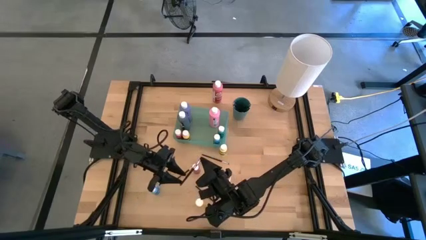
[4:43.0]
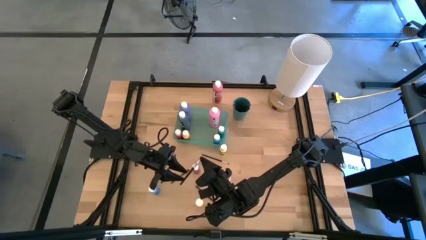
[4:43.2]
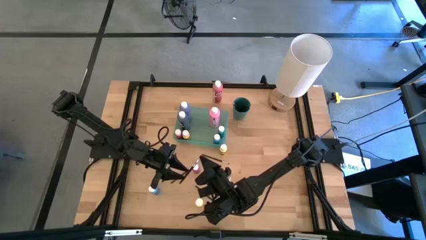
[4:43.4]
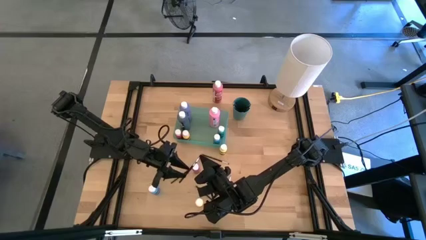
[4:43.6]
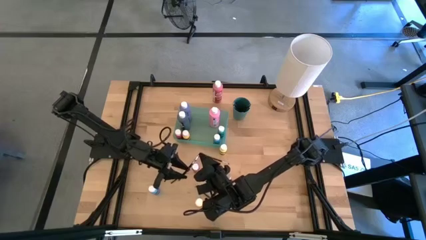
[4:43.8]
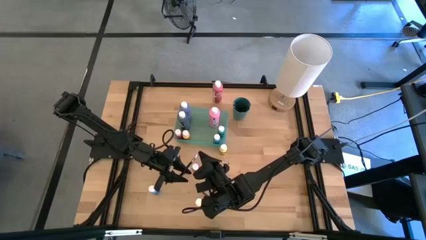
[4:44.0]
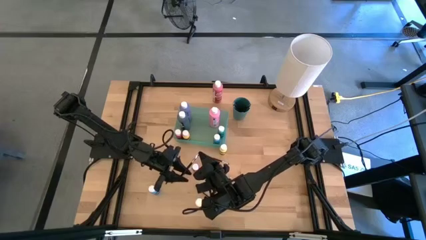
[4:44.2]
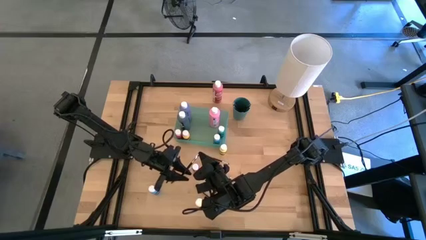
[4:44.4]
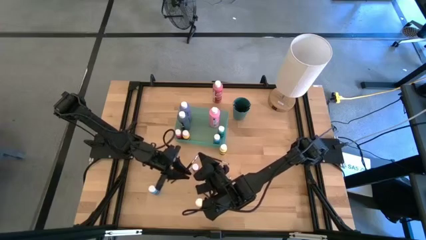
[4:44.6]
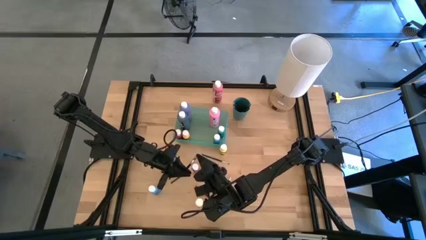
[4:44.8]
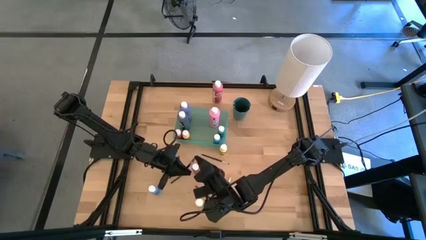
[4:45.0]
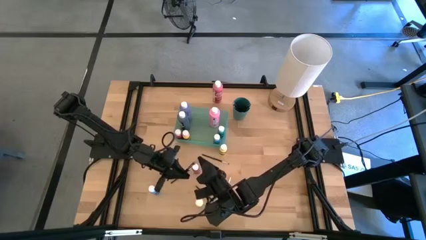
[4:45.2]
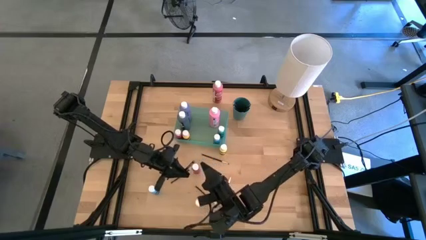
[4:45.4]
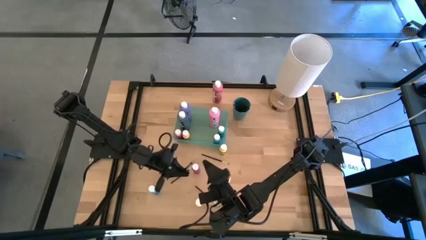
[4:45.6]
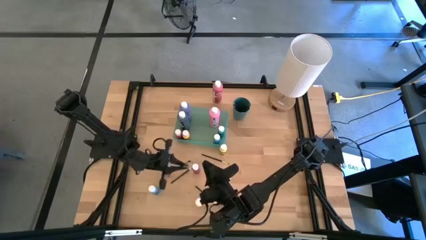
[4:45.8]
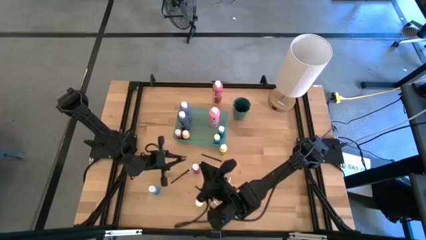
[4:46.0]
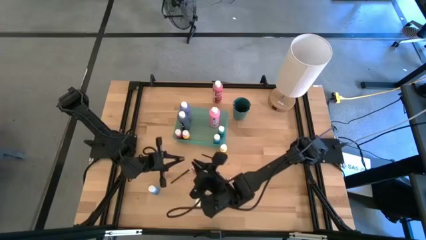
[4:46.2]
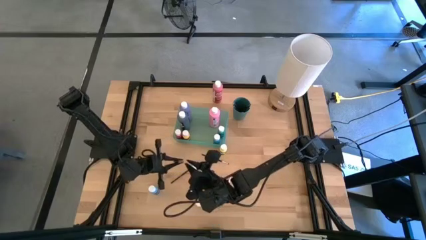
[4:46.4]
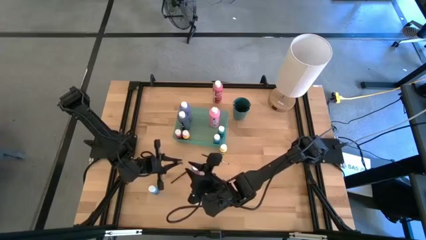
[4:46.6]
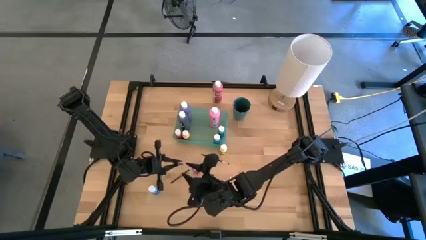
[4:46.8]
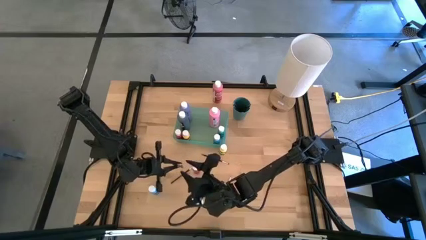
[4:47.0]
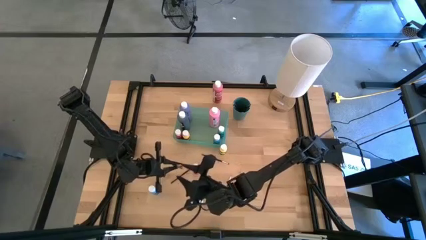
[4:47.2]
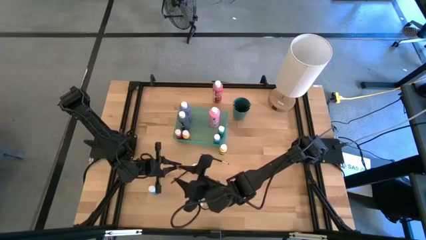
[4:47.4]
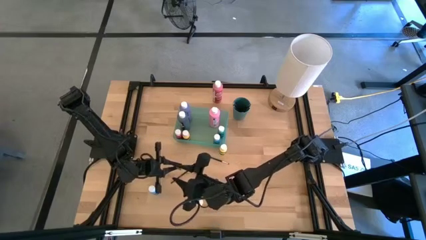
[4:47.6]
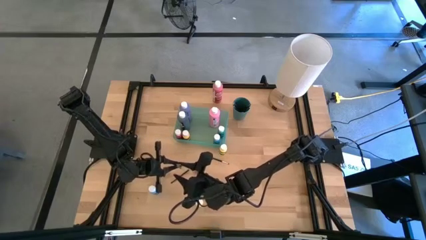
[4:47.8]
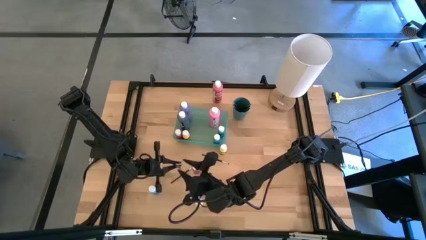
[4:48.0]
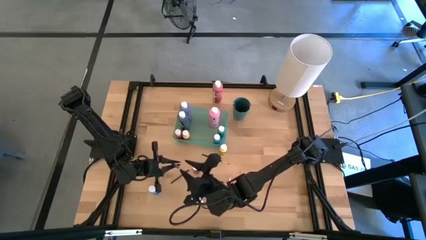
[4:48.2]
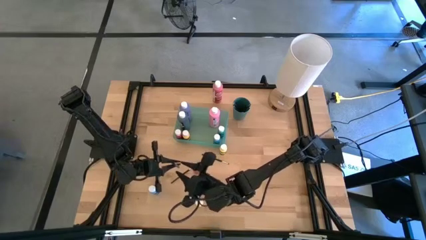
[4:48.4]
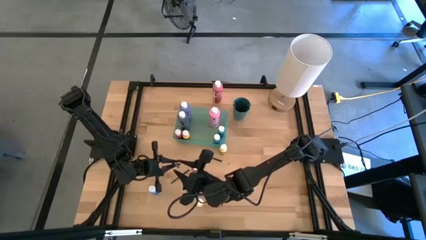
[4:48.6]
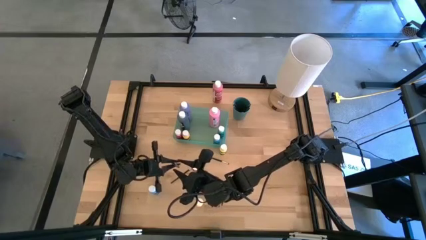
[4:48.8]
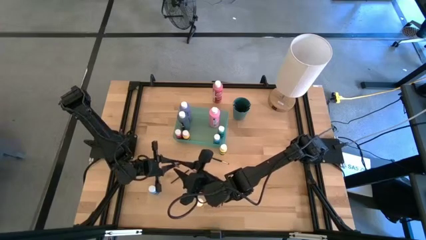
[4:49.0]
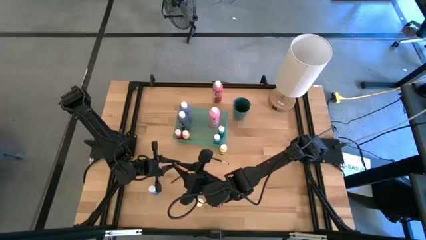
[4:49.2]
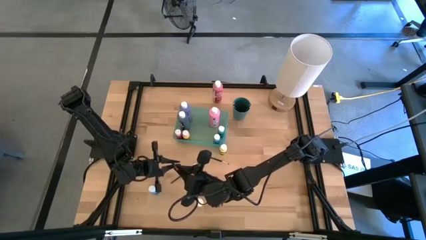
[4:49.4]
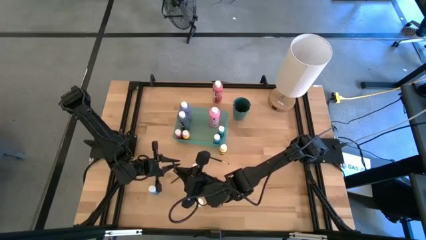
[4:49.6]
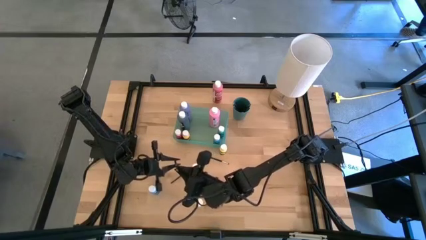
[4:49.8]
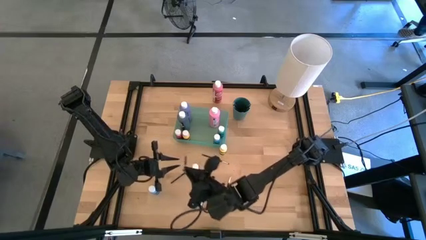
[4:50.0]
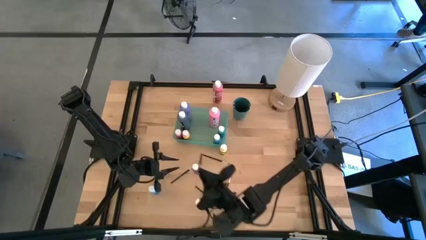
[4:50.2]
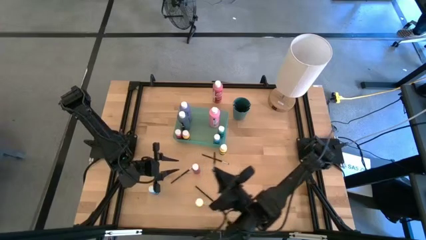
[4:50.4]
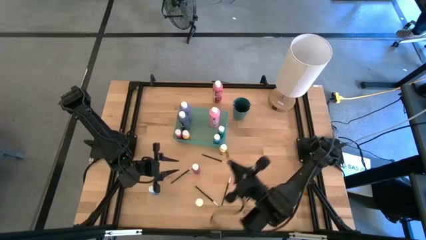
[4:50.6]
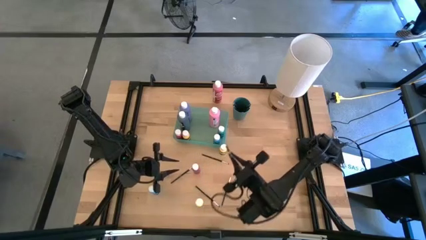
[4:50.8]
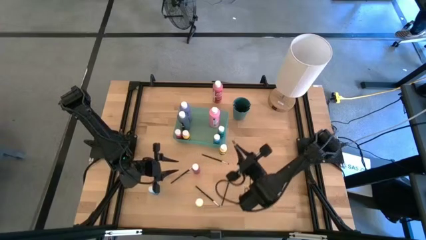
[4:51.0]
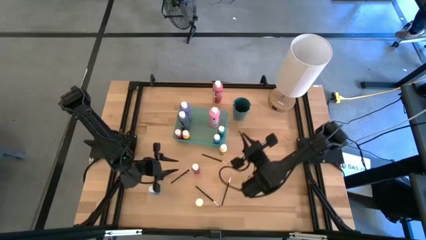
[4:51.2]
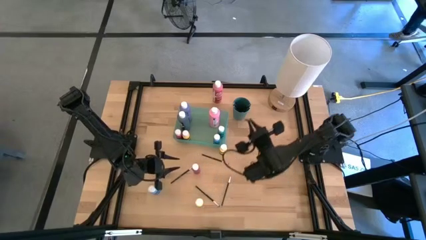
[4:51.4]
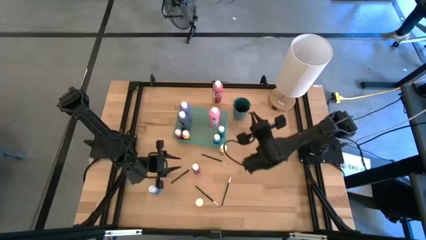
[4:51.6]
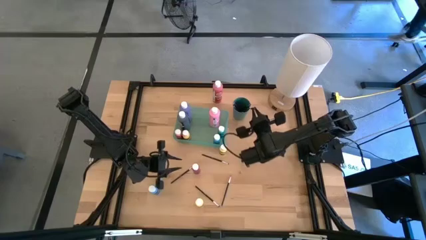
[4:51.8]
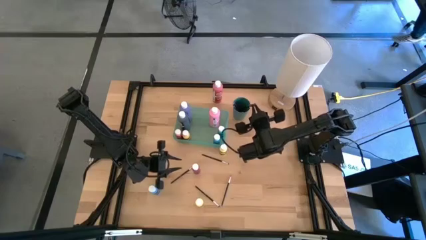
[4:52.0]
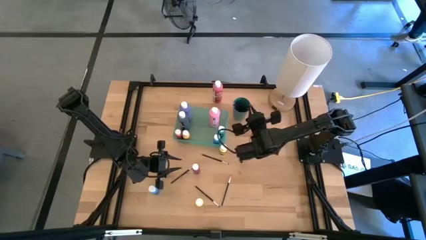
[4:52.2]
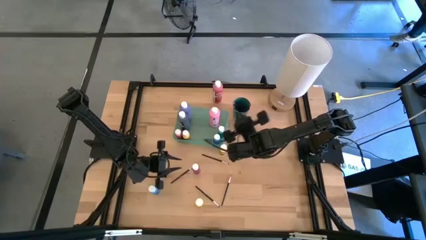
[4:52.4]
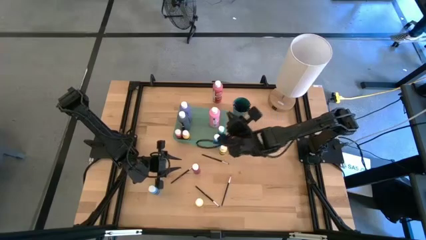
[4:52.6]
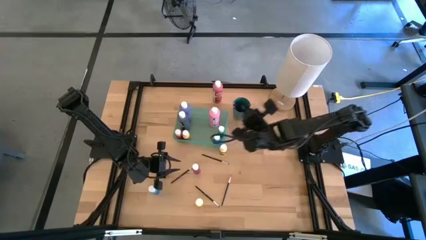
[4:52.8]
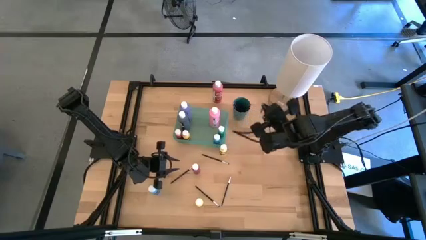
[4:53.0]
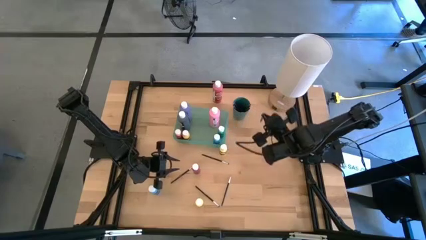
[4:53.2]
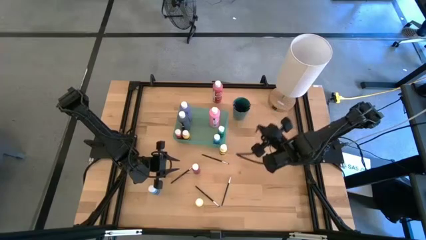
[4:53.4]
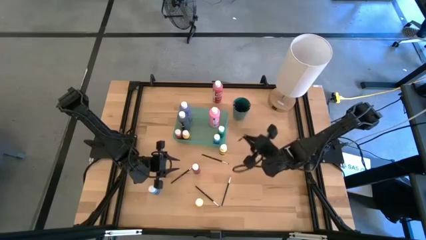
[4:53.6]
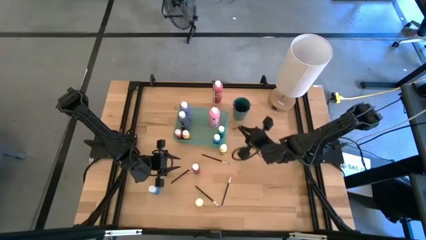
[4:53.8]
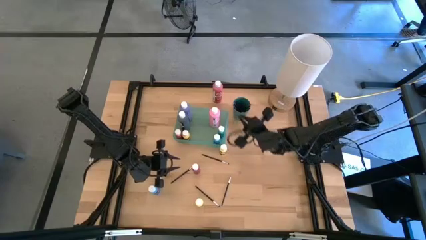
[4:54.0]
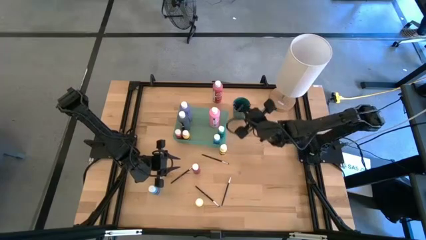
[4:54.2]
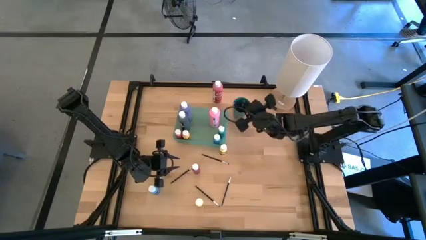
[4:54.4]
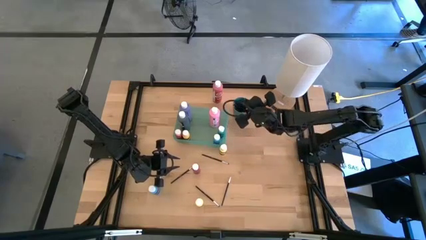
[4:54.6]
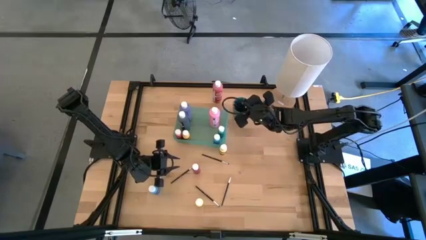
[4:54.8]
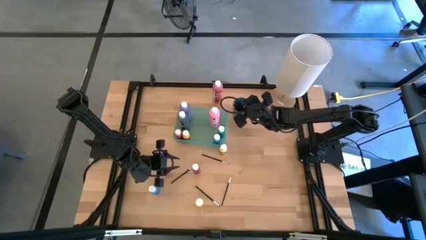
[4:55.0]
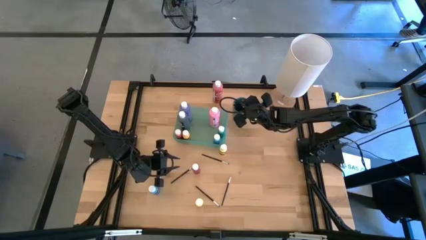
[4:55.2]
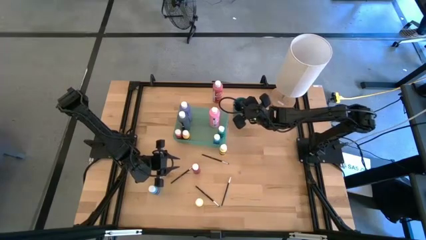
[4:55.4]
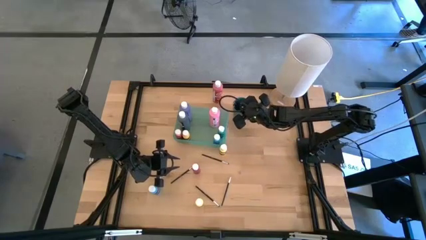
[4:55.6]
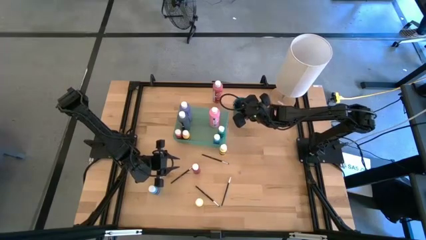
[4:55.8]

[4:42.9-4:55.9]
Task: Pick & Place Paint Supplies
Put the black paint brush into the dark green cup
